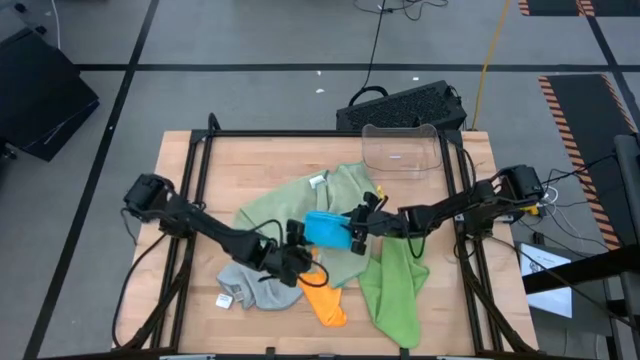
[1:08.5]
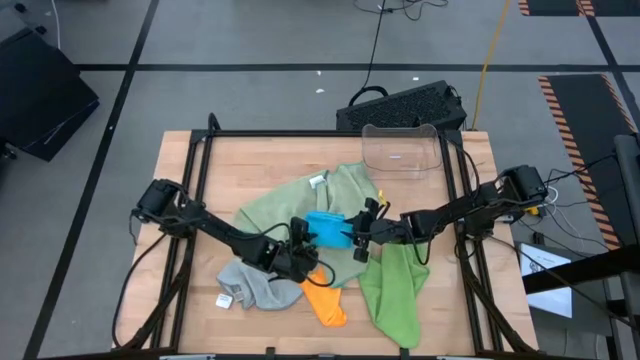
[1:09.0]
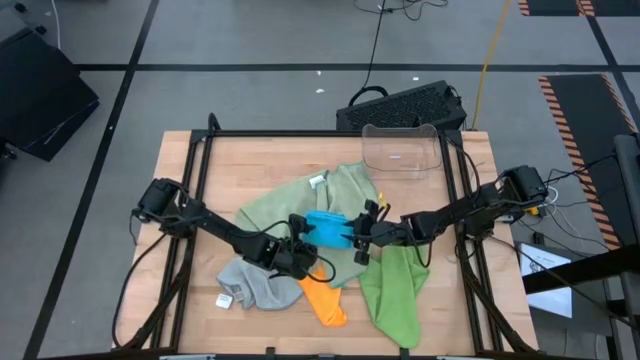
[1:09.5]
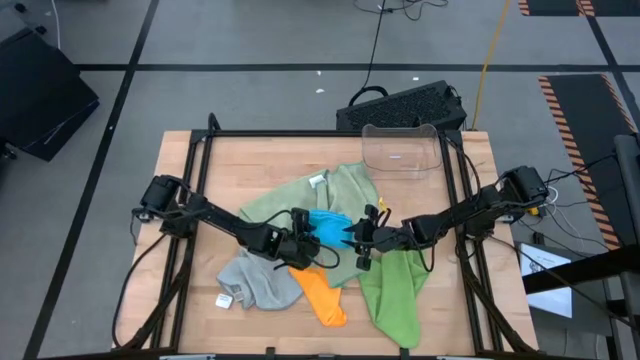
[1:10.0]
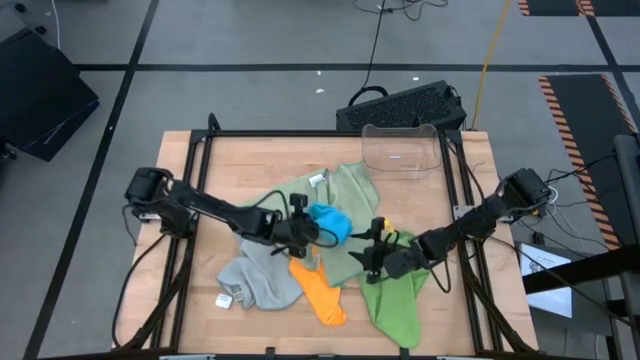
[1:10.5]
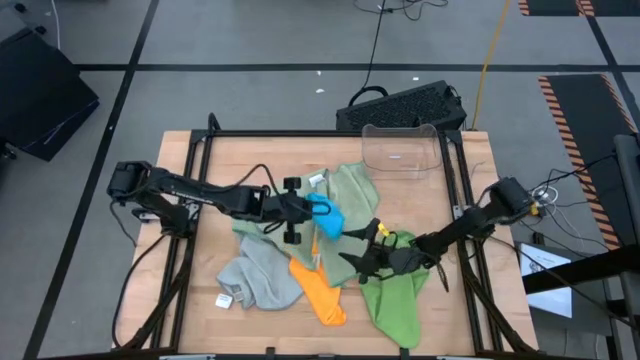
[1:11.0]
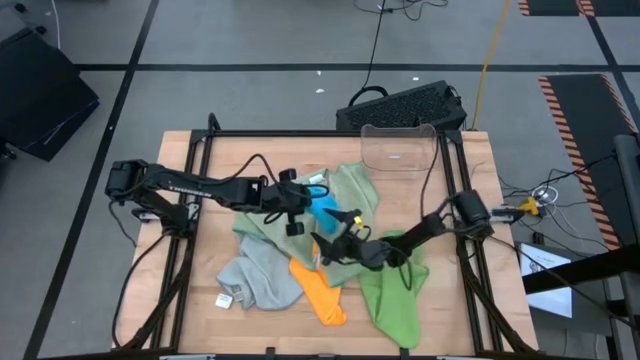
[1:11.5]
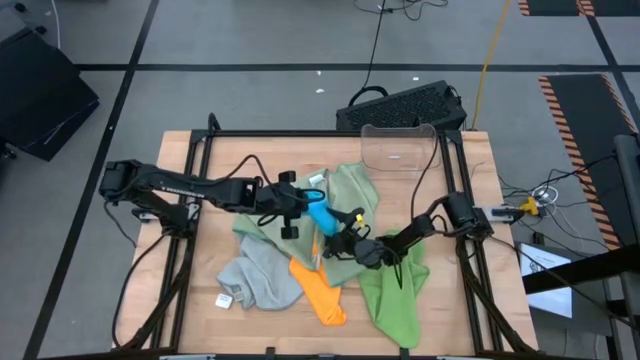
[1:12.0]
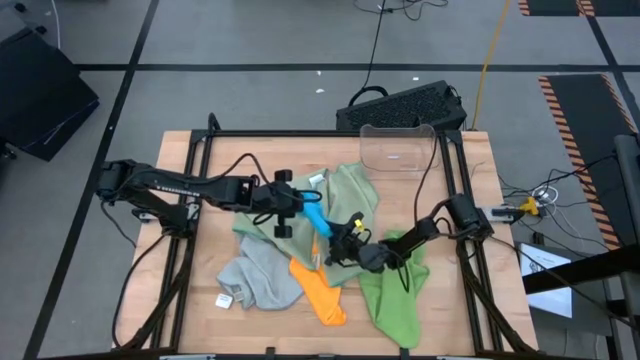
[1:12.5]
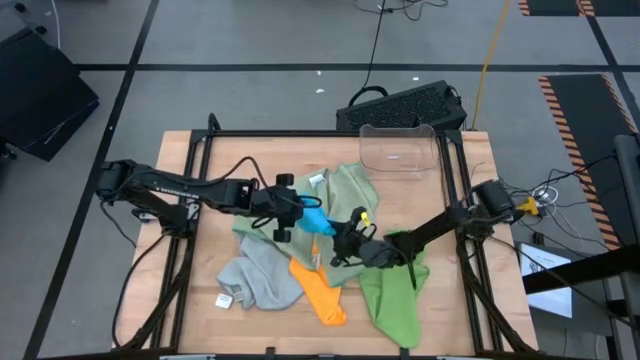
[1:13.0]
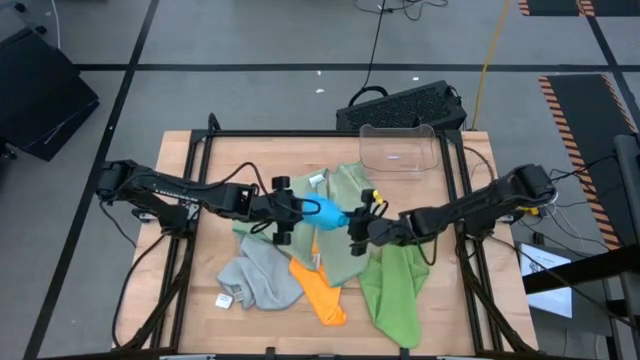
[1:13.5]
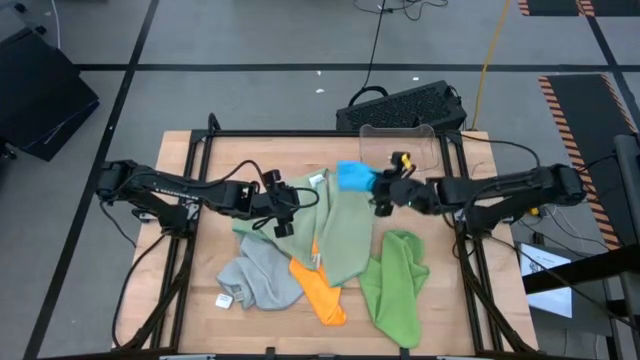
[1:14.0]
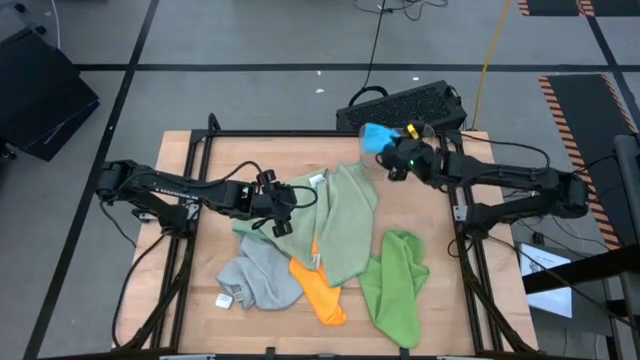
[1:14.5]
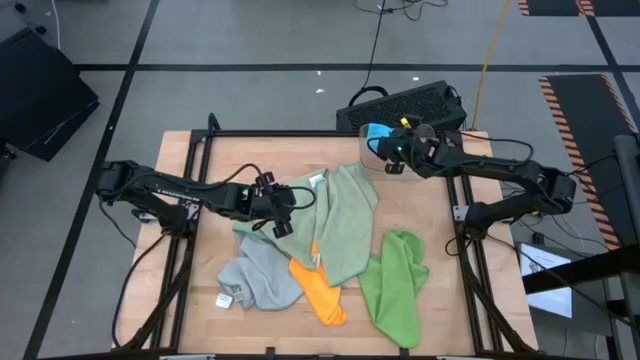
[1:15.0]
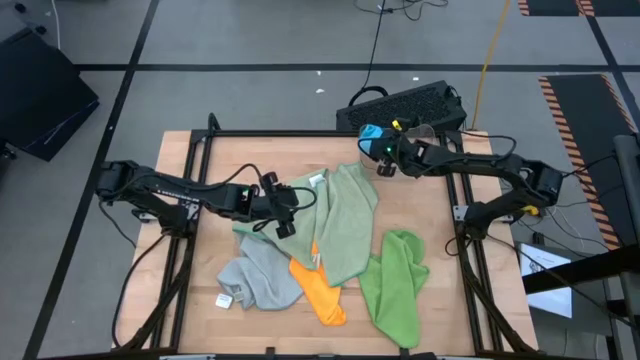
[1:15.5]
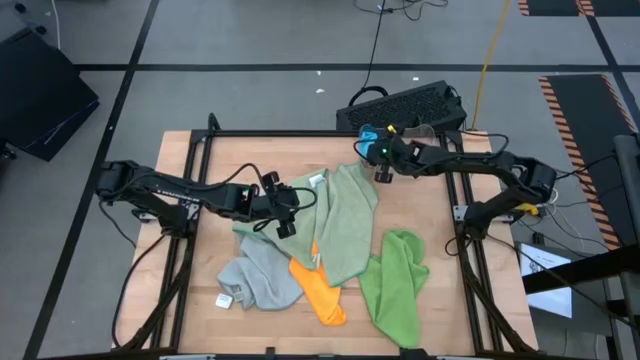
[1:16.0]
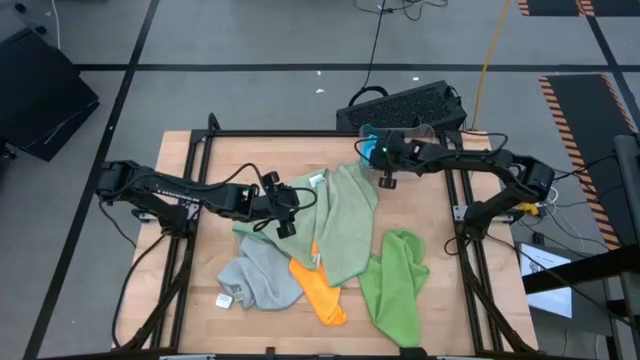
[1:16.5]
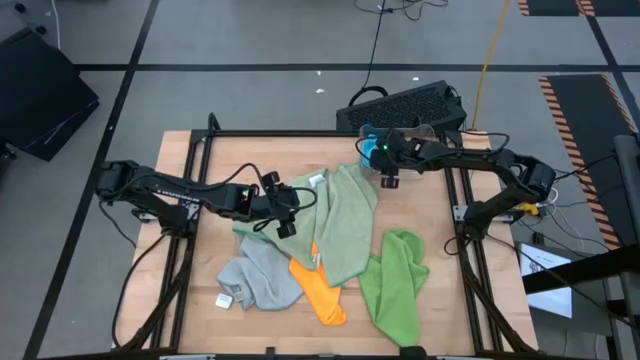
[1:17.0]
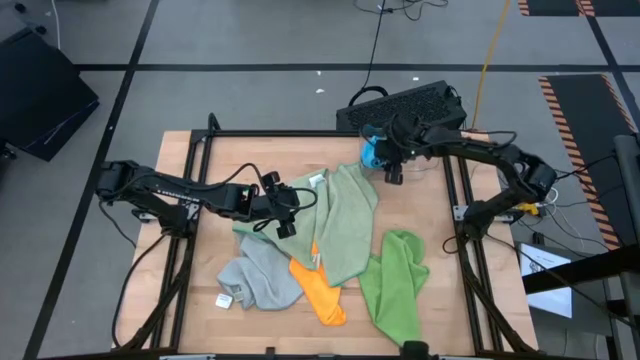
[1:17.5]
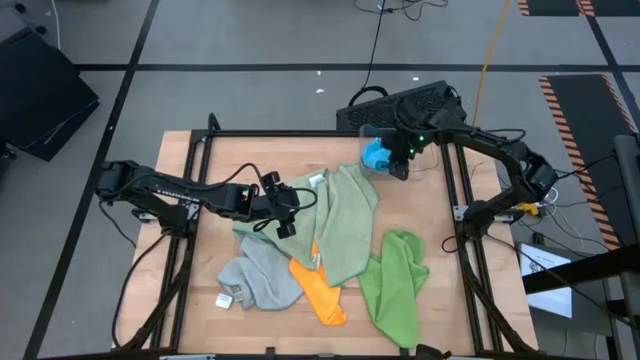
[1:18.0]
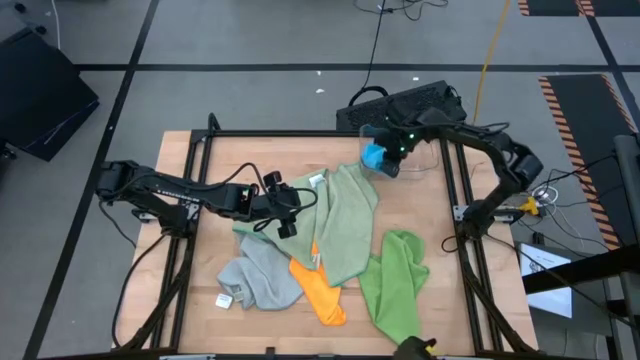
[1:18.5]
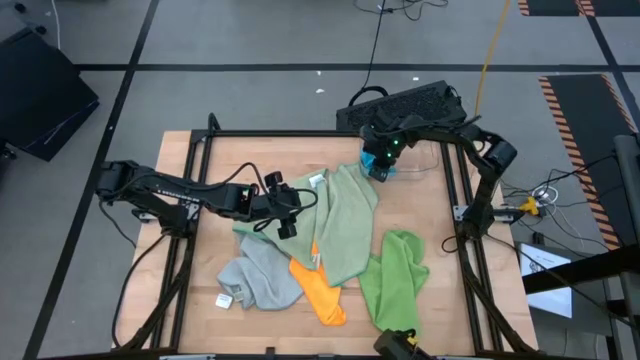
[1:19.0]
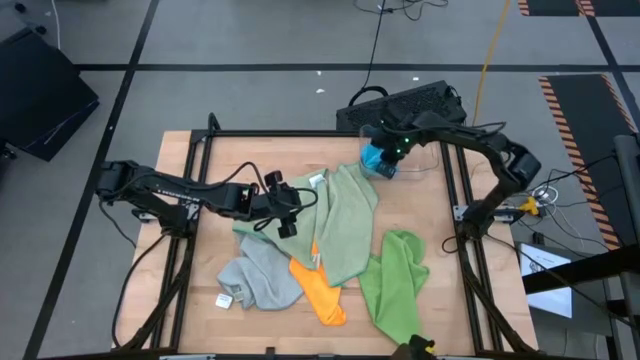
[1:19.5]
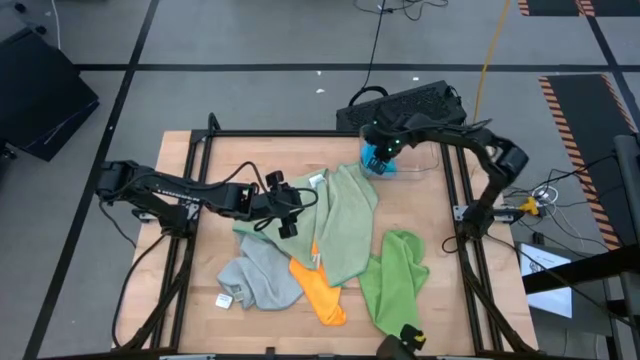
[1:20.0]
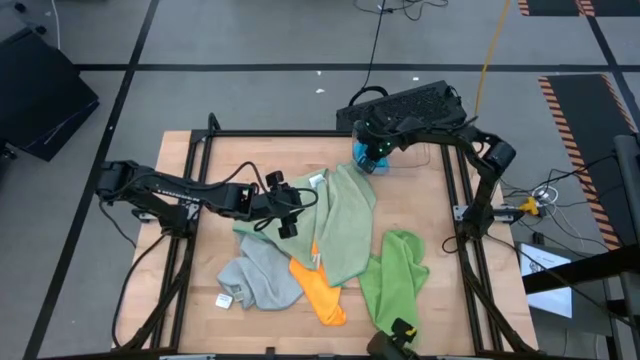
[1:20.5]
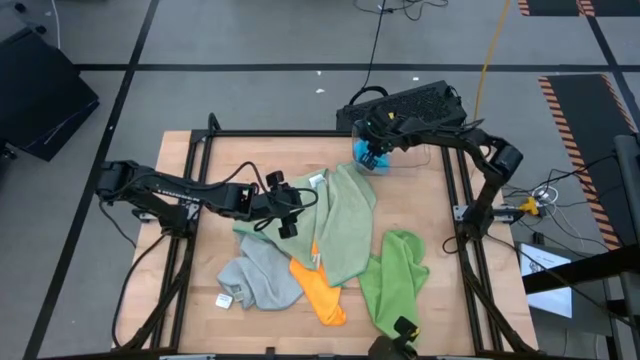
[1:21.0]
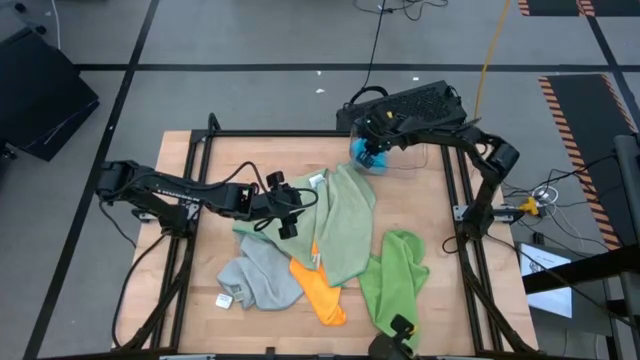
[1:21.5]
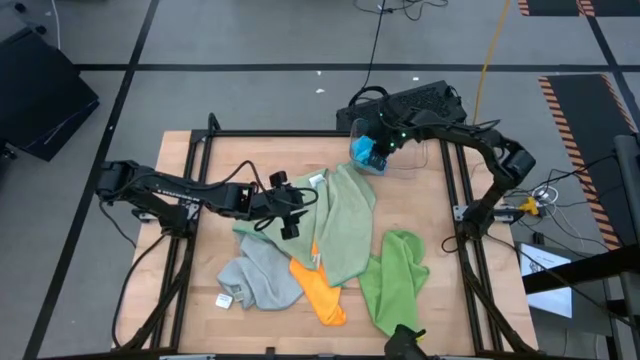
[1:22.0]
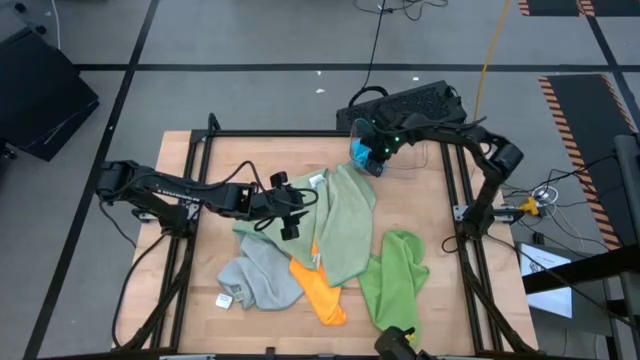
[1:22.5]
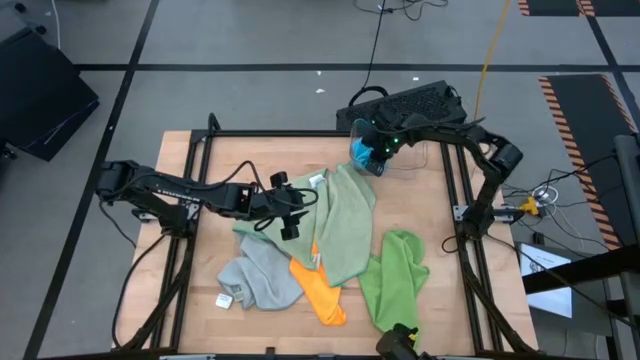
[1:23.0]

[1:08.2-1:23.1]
Task: Fold microfiber towels
Put the blue microfiber towel into the transparent bin

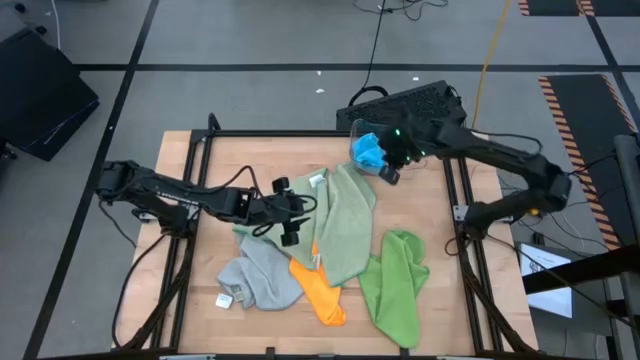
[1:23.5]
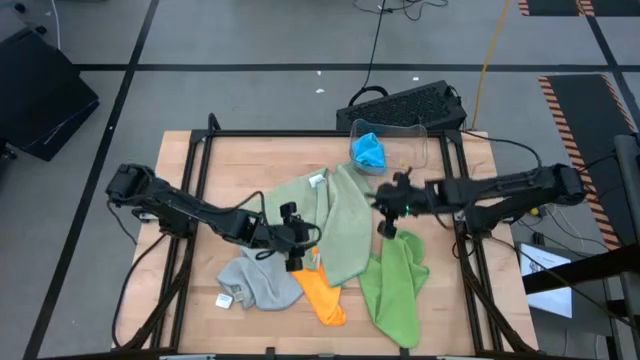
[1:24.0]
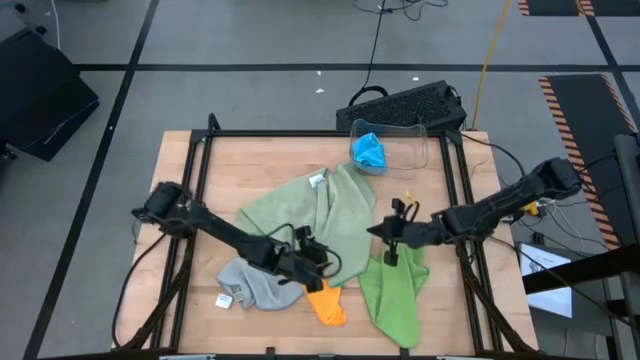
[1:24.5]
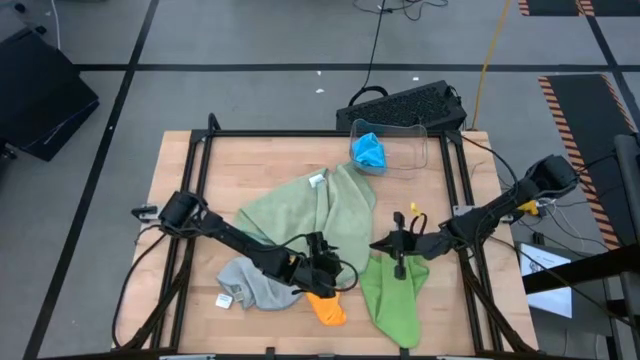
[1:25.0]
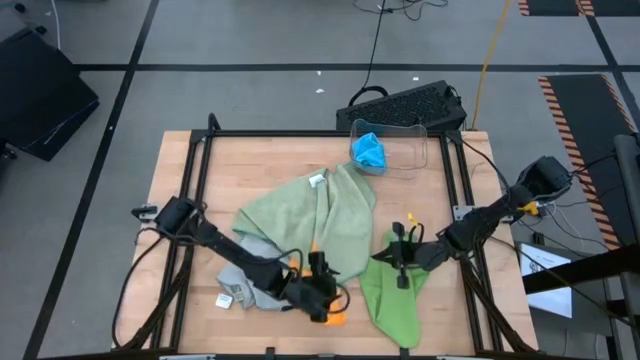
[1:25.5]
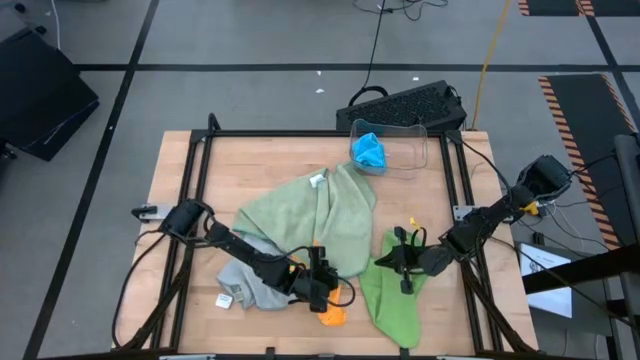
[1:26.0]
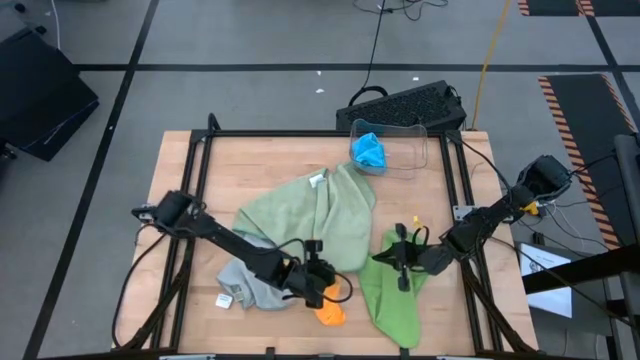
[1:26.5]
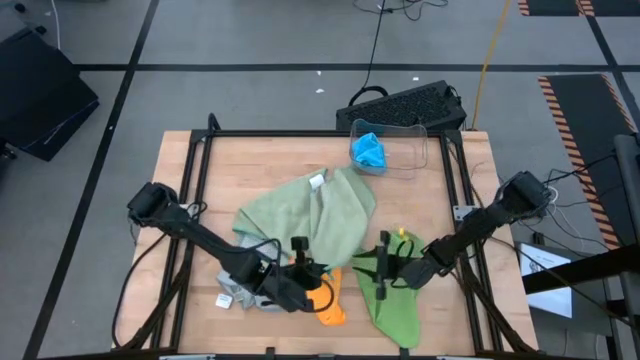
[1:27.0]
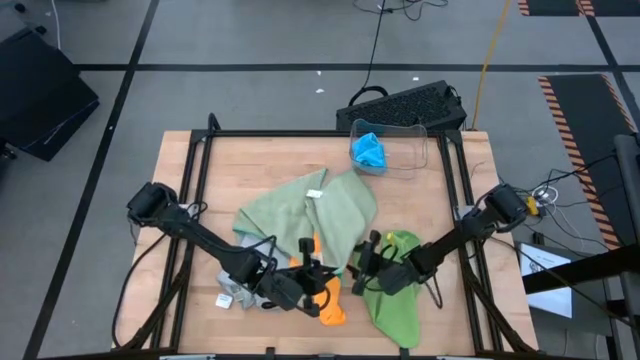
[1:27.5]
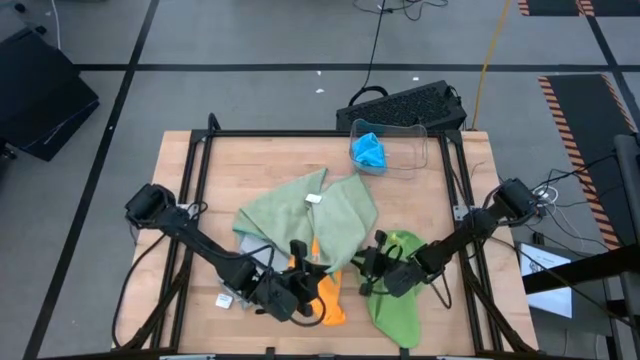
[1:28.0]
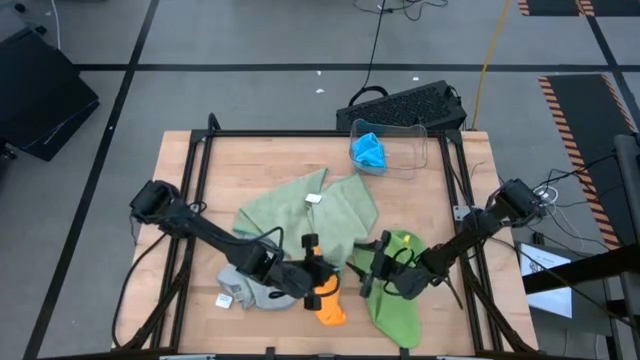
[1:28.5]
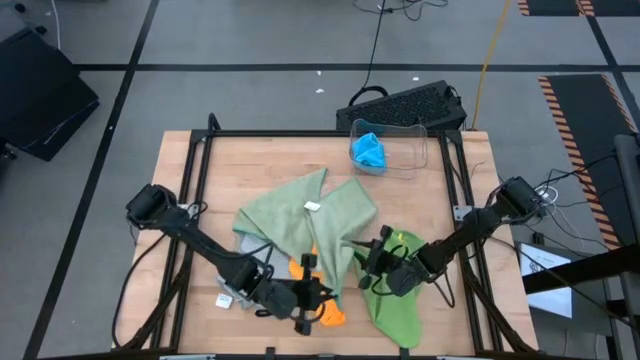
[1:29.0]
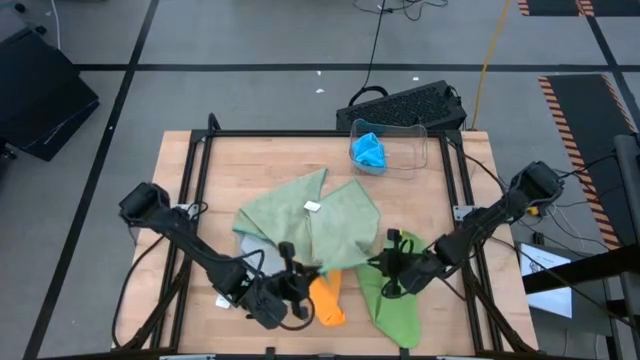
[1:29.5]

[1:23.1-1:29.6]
Fold the right light green microfiber towel
